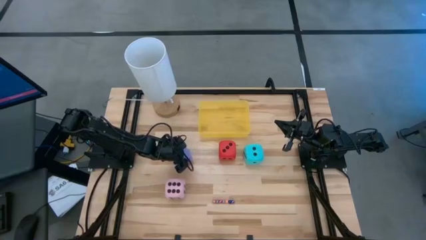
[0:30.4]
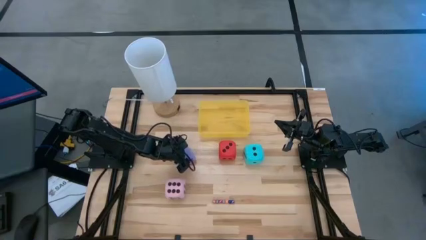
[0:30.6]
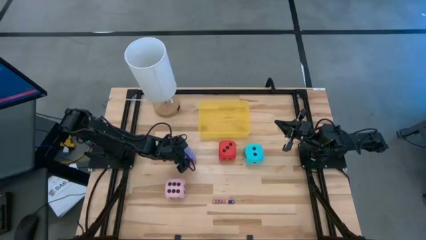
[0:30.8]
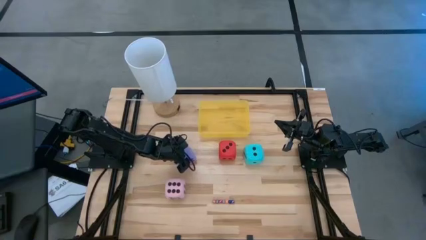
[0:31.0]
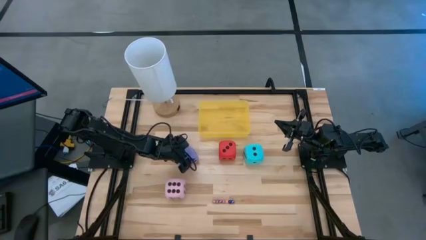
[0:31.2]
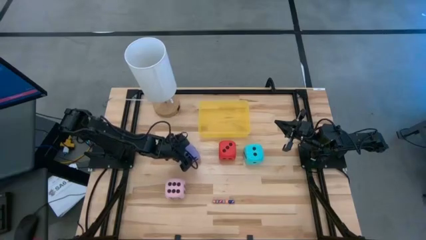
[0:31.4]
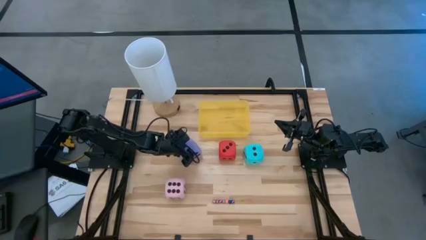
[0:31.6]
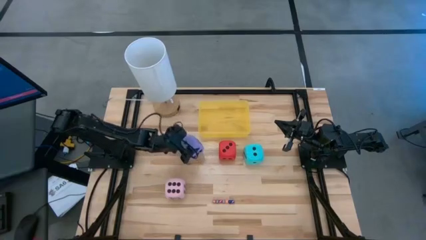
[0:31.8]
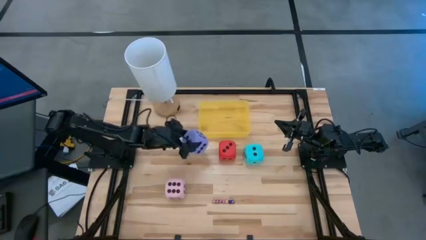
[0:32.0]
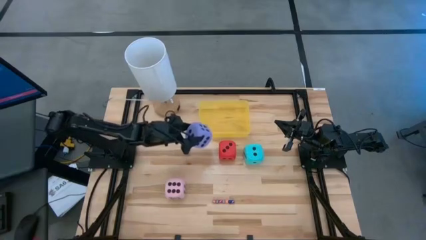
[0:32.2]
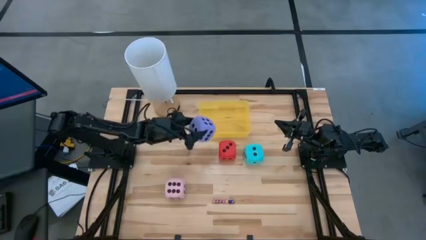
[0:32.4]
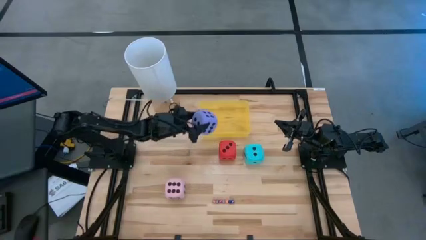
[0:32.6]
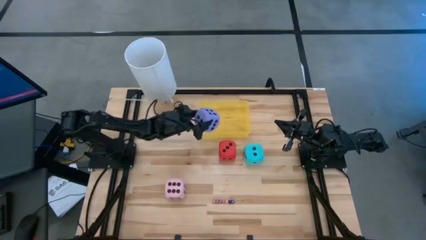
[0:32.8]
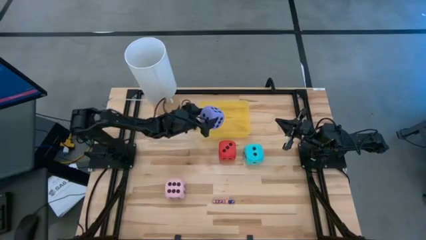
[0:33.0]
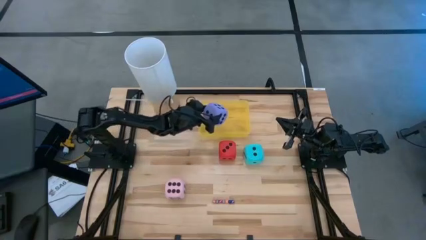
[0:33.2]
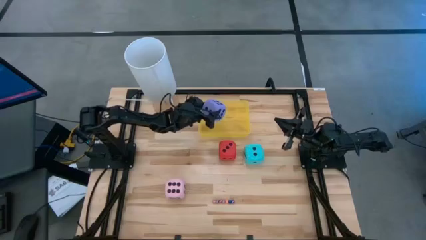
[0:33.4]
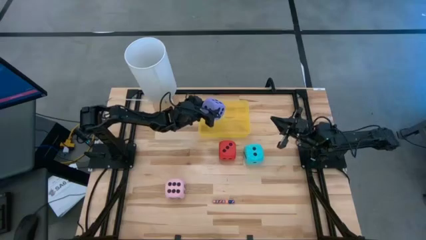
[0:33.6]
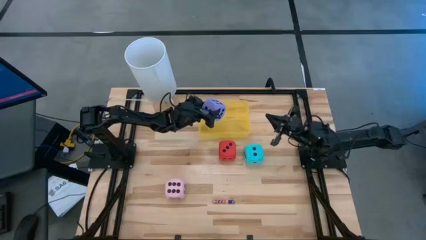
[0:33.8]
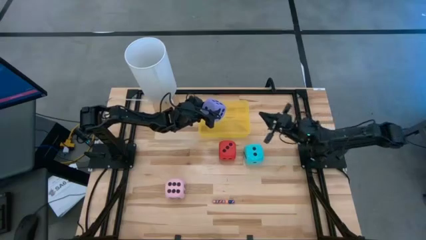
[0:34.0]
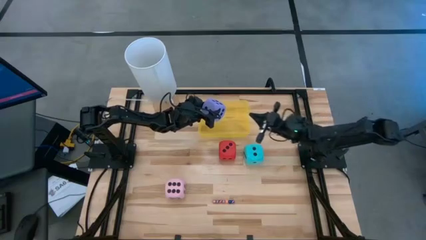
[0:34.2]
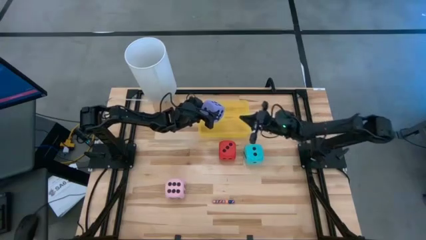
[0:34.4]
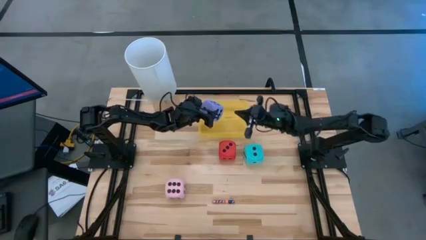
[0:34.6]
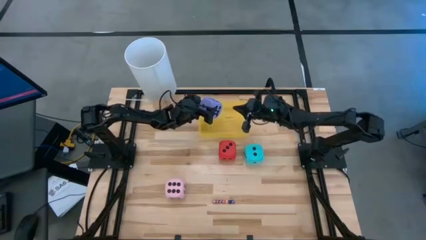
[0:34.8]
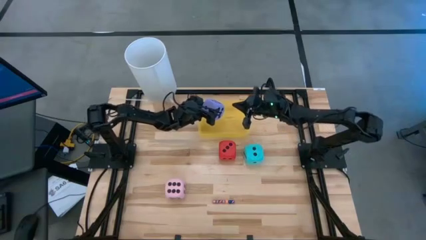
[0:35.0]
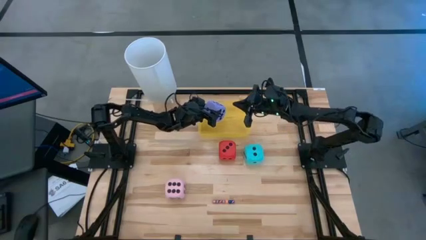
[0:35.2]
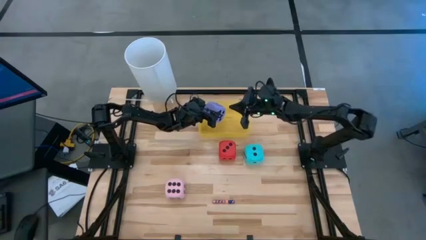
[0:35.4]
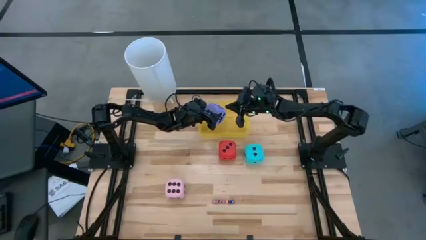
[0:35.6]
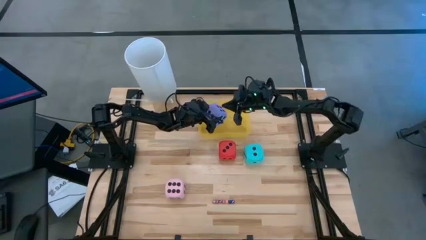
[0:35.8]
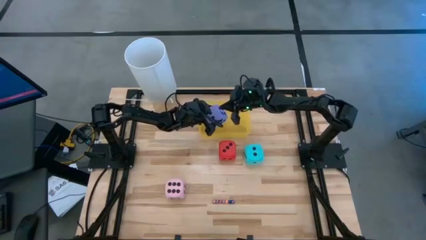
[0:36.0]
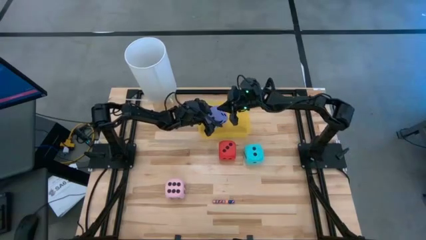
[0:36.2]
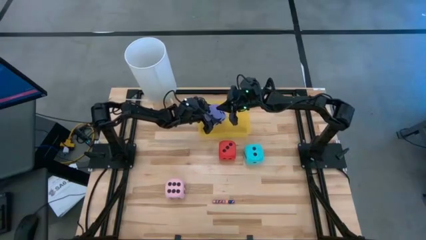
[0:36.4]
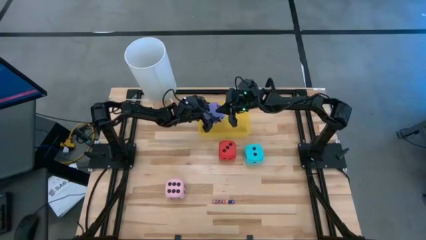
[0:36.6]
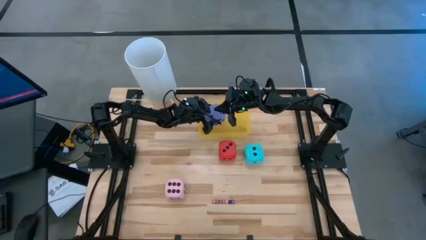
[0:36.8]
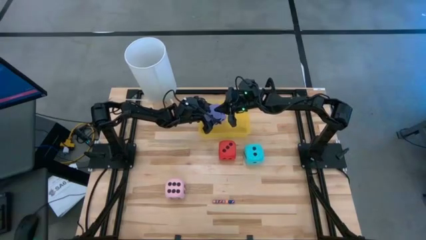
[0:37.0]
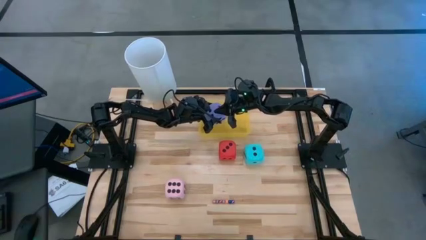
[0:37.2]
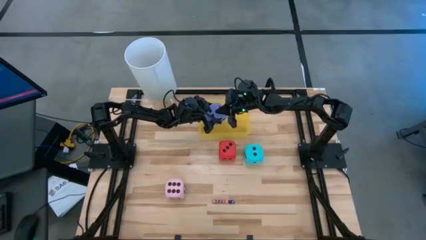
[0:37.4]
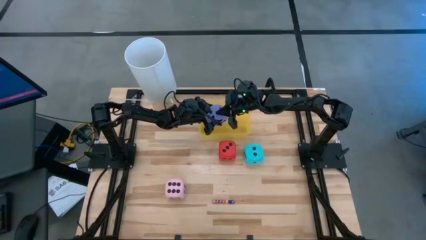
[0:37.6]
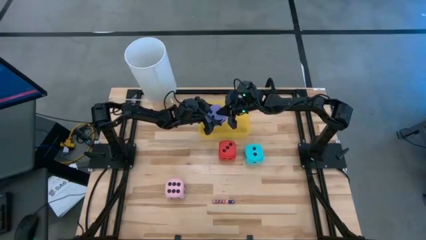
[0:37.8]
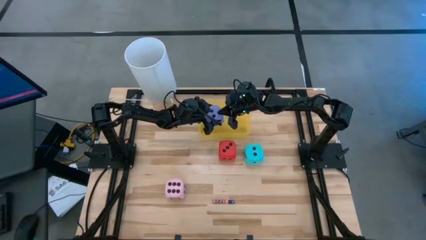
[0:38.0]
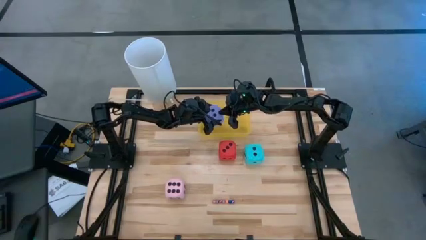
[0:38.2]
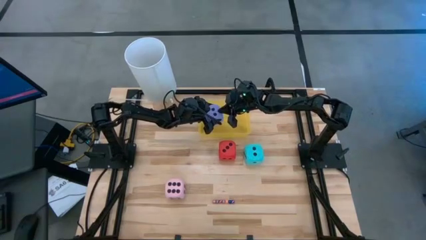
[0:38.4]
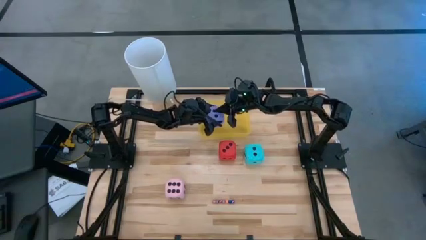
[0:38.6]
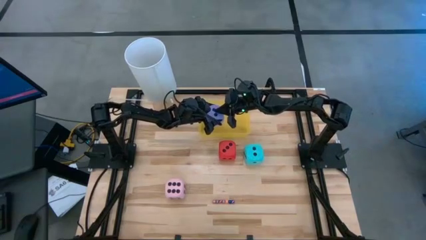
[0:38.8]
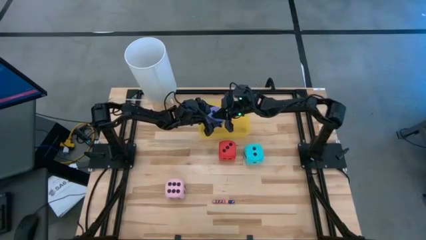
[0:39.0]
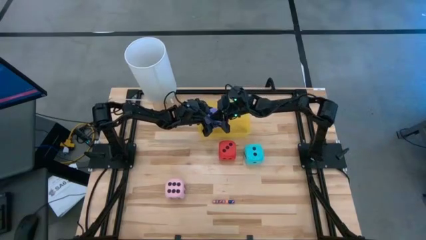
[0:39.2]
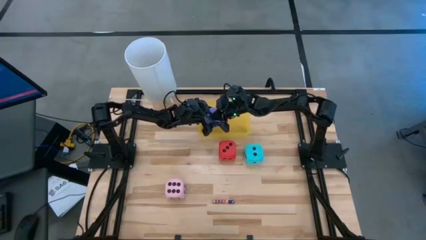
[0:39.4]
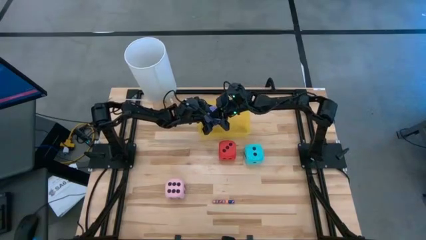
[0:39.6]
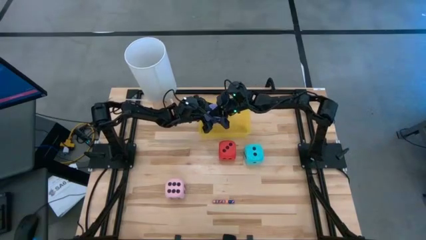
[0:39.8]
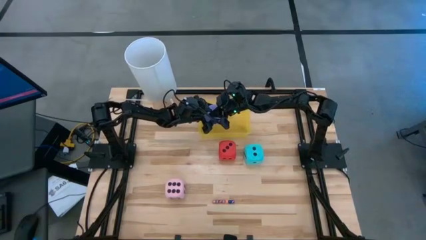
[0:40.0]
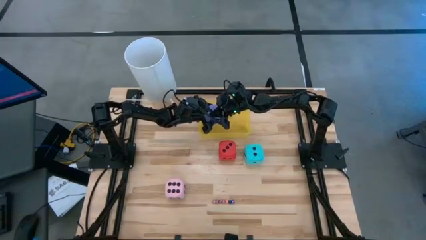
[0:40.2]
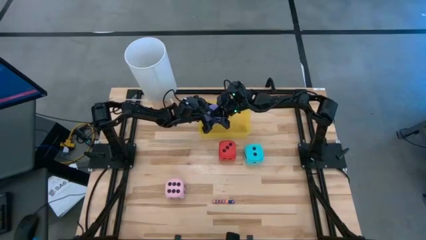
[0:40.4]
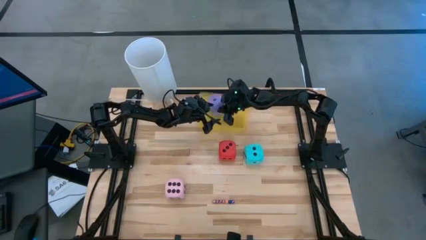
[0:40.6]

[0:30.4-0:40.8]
Task: Pick & Place Dice
Put the big purple dice into the yellow bin

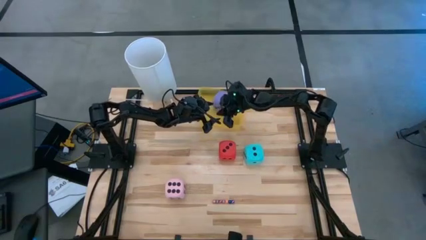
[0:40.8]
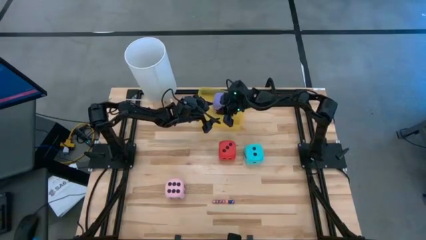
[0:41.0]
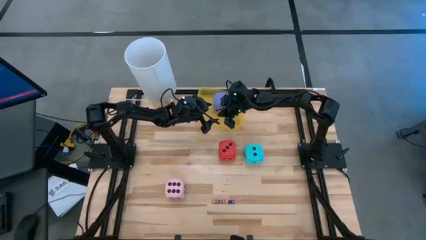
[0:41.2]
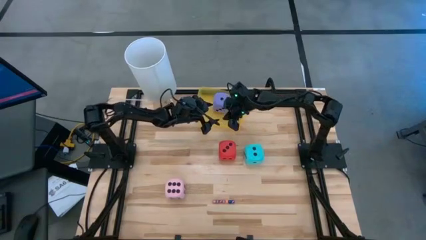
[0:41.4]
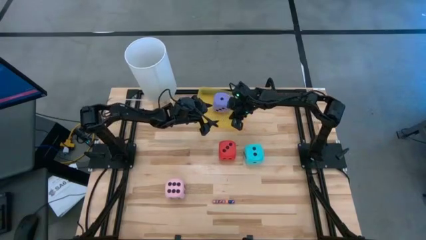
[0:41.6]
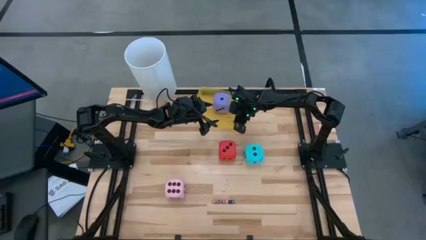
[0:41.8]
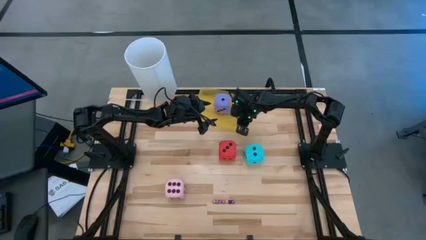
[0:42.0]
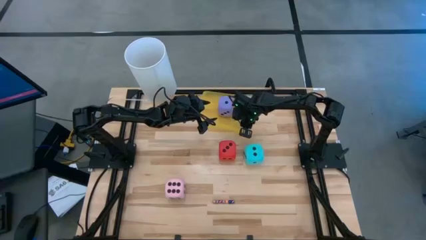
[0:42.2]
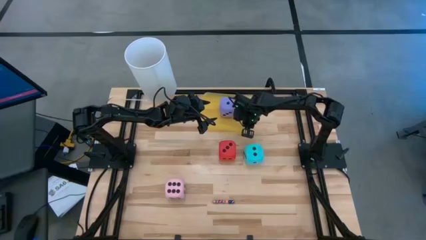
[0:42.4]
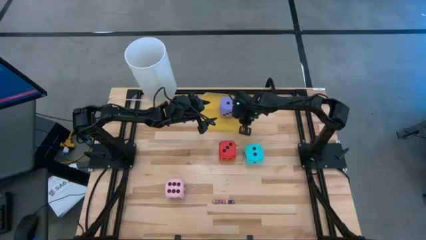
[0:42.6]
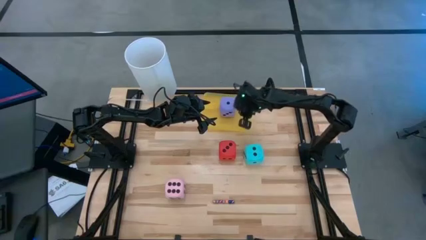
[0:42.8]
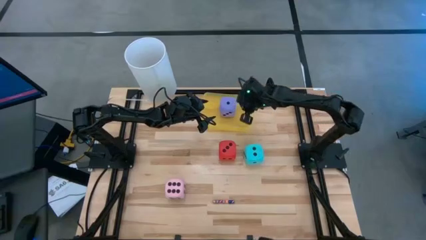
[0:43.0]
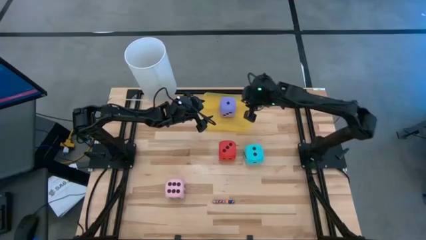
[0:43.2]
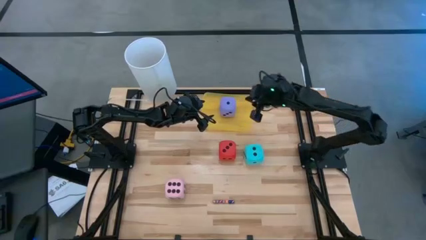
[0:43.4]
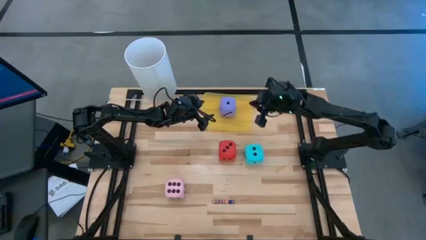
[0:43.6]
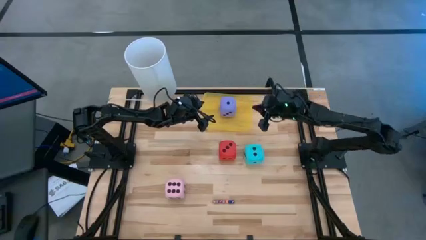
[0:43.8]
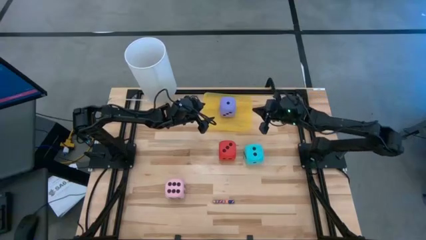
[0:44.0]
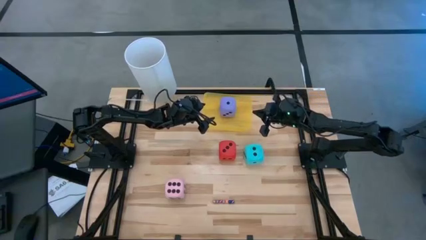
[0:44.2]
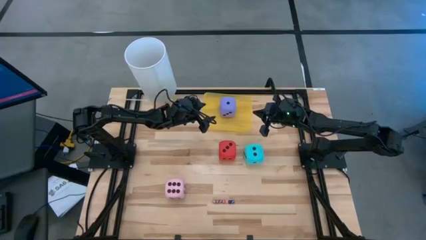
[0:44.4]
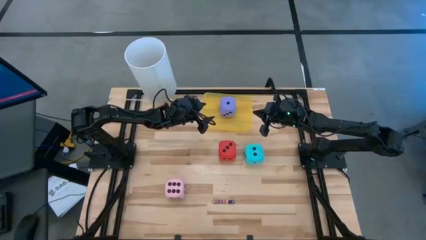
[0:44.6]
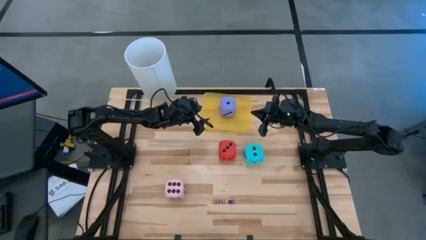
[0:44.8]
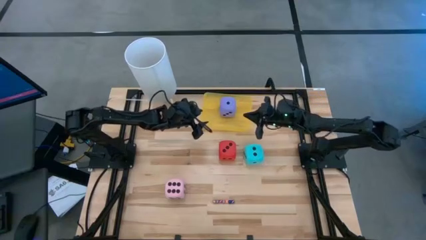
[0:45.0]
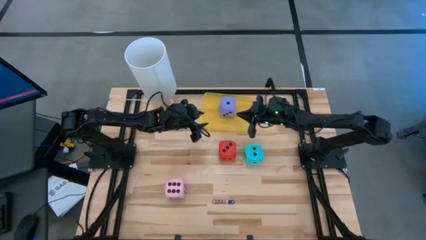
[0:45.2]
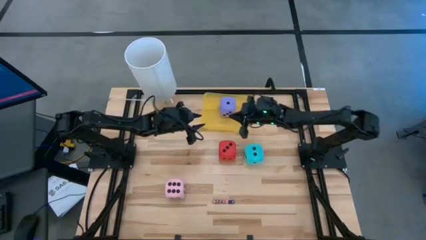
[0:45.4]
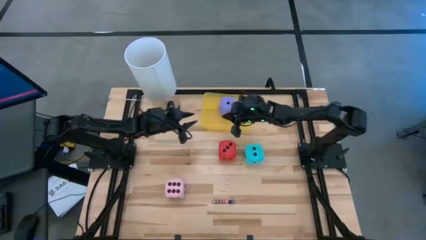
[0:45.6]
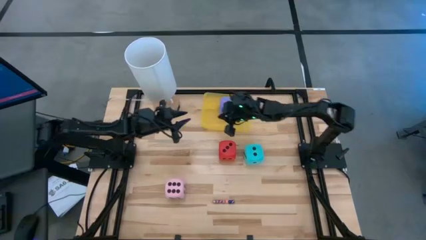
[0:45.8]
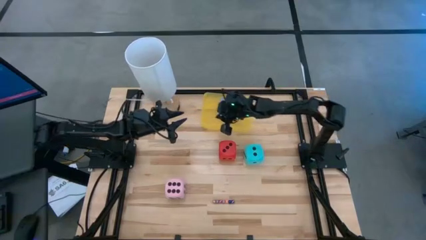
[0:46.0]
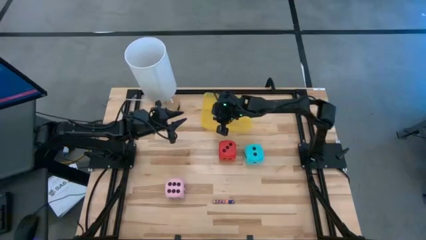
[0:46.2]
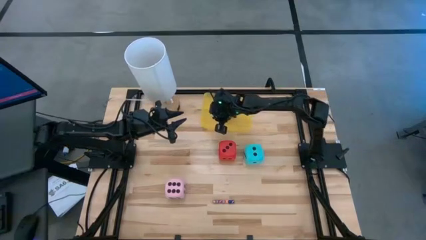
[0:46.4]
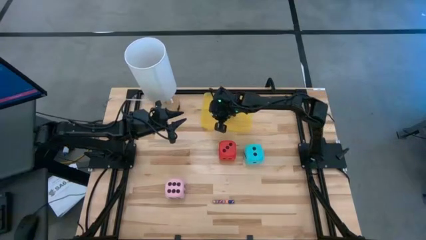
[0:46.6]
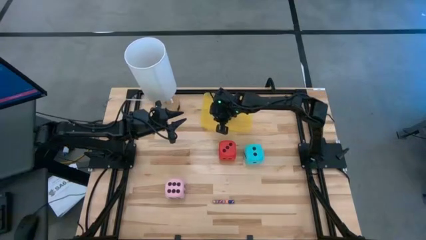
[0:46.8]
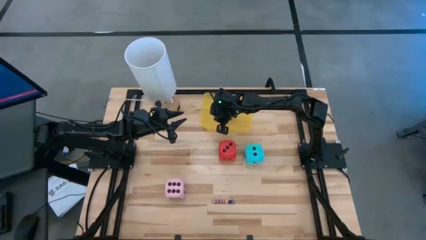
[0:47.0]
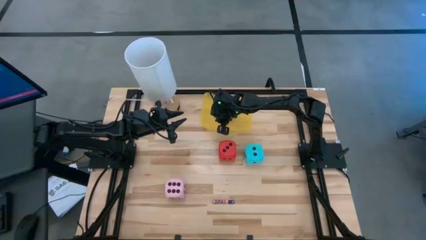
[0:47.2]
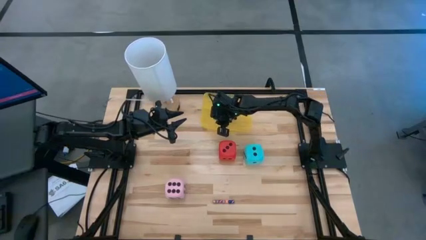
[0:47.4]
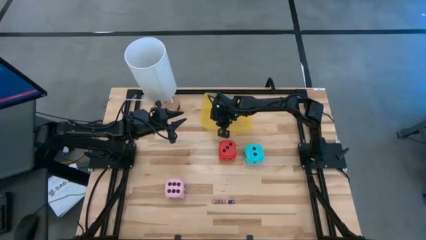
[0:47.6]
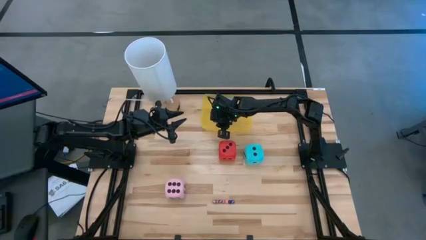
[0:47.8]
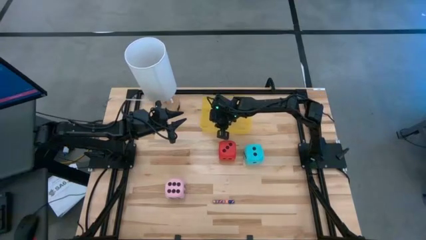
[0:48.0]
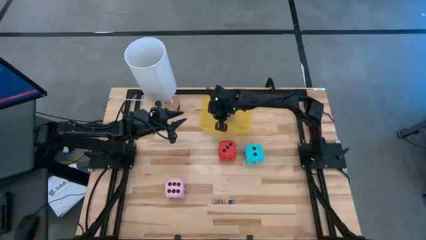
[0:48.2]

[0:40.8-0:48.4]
Adjust the yellow bin
